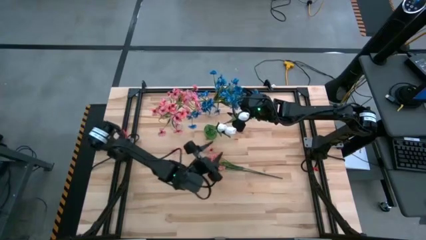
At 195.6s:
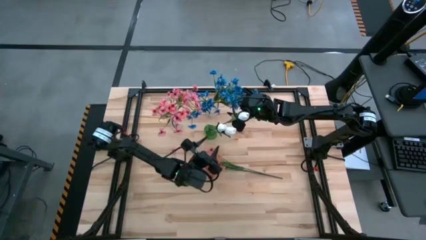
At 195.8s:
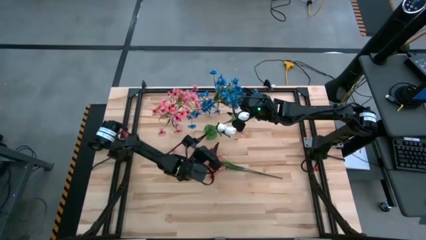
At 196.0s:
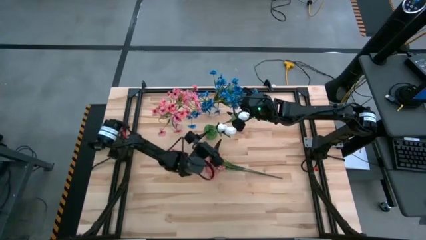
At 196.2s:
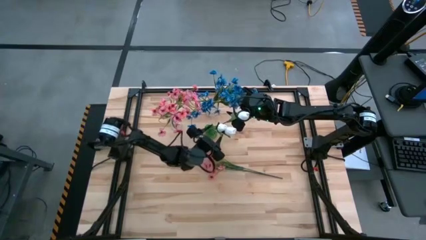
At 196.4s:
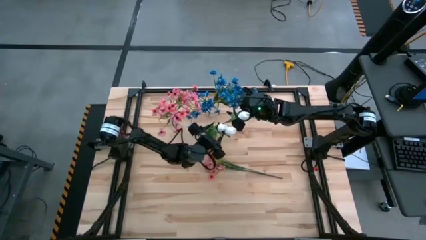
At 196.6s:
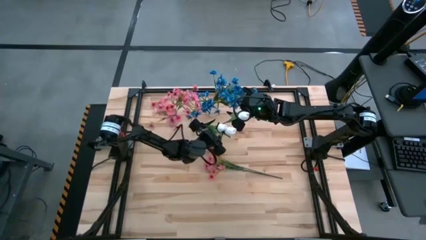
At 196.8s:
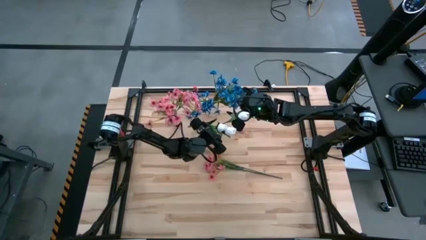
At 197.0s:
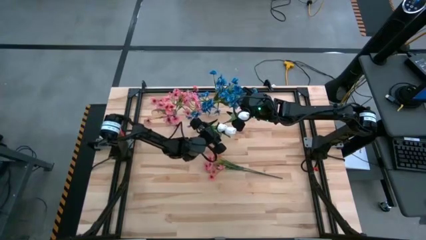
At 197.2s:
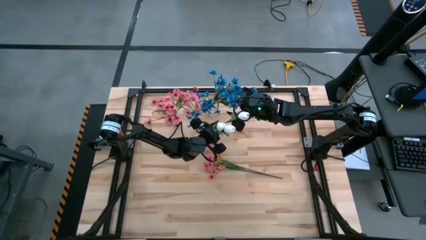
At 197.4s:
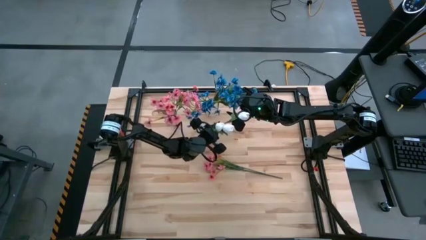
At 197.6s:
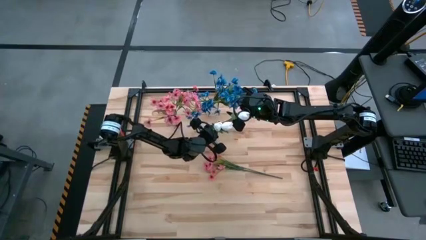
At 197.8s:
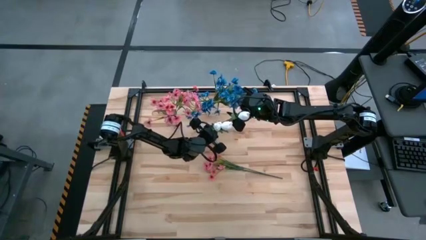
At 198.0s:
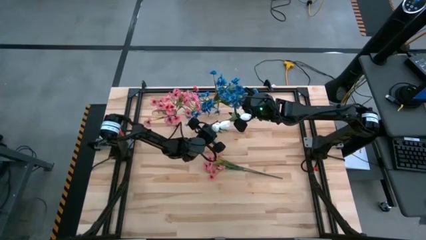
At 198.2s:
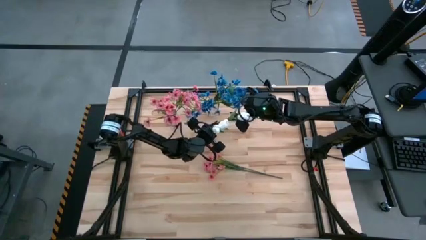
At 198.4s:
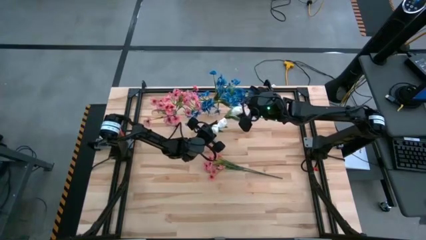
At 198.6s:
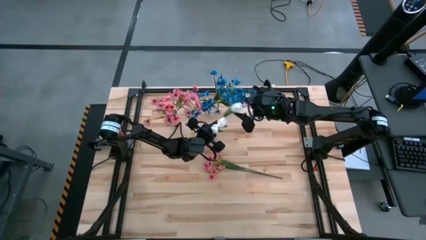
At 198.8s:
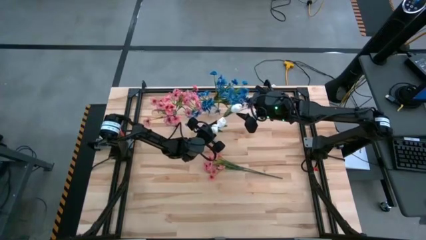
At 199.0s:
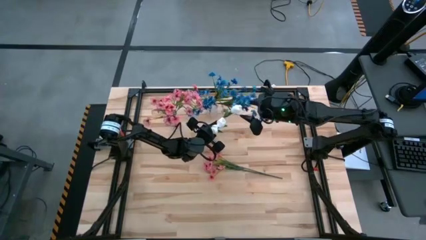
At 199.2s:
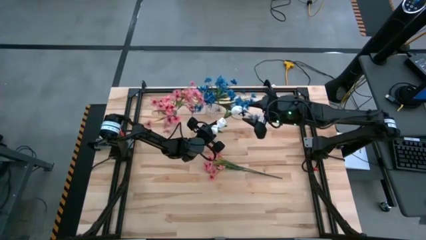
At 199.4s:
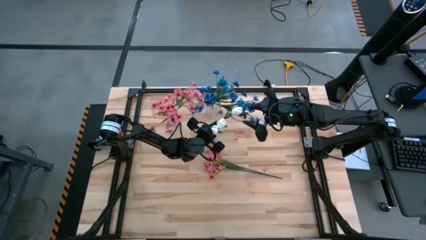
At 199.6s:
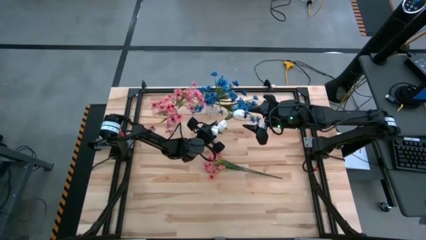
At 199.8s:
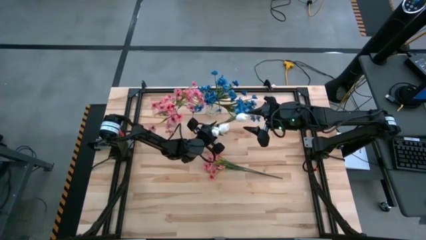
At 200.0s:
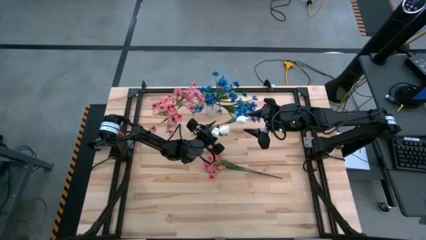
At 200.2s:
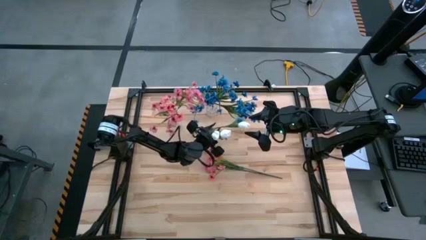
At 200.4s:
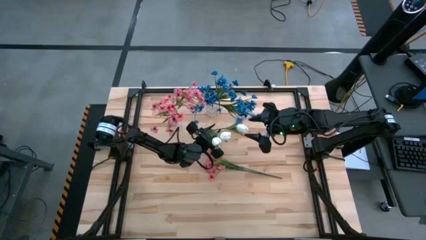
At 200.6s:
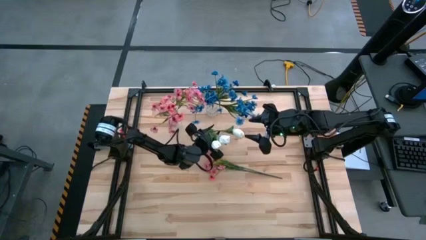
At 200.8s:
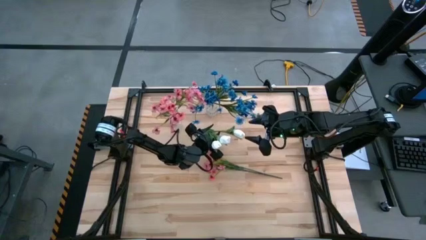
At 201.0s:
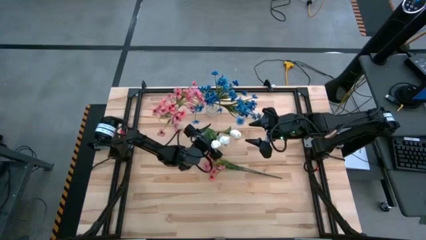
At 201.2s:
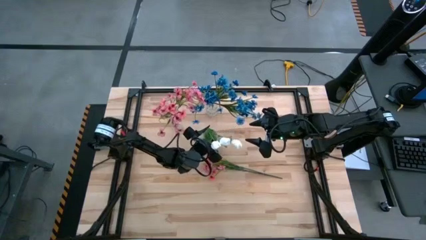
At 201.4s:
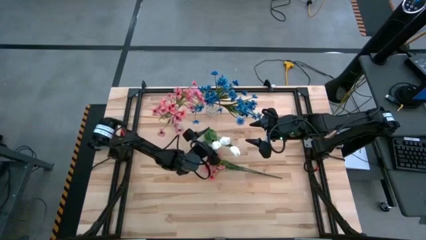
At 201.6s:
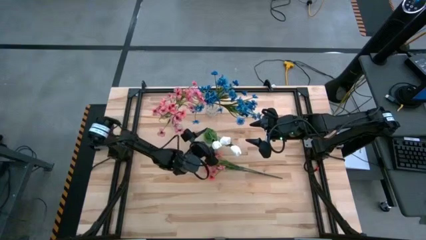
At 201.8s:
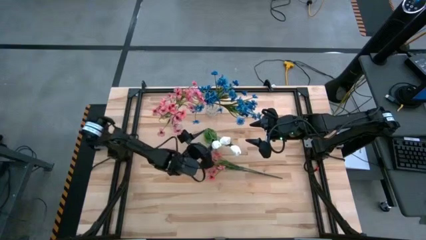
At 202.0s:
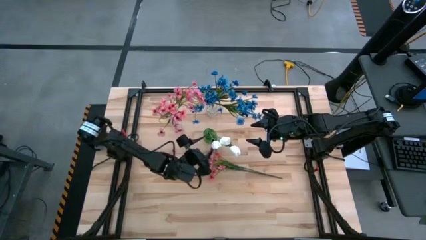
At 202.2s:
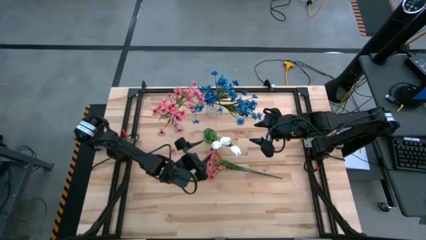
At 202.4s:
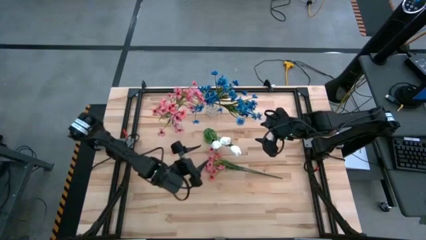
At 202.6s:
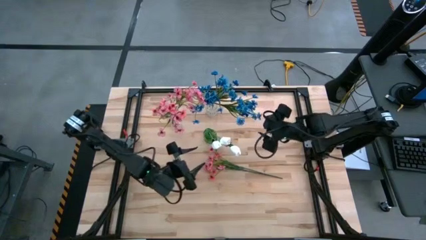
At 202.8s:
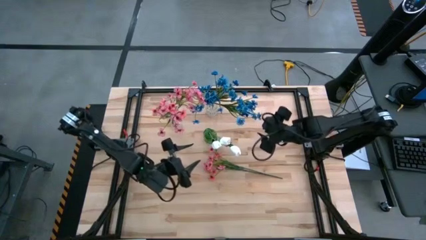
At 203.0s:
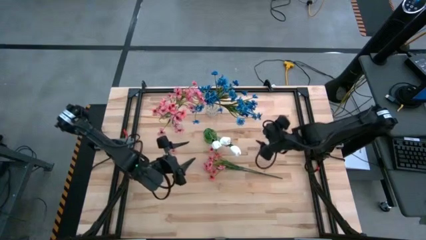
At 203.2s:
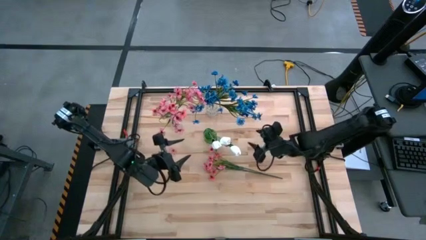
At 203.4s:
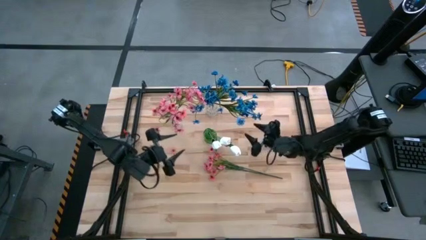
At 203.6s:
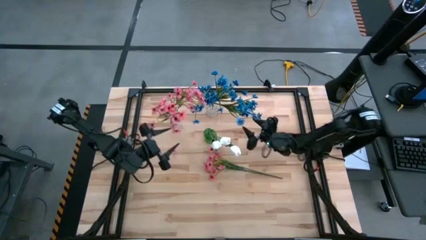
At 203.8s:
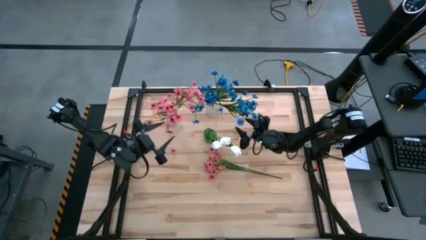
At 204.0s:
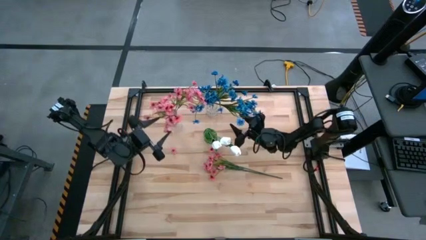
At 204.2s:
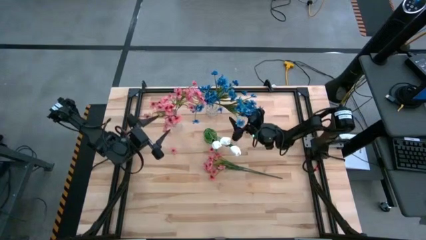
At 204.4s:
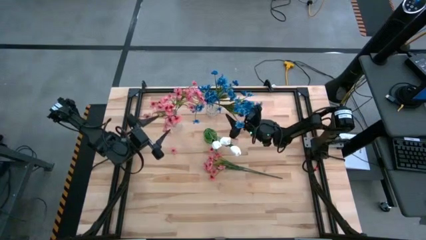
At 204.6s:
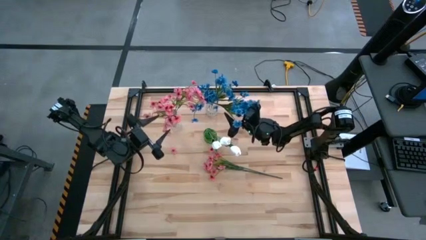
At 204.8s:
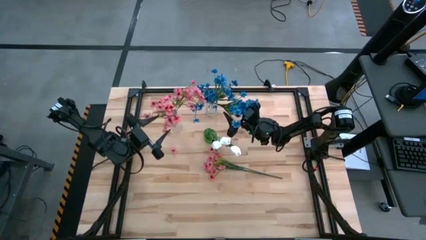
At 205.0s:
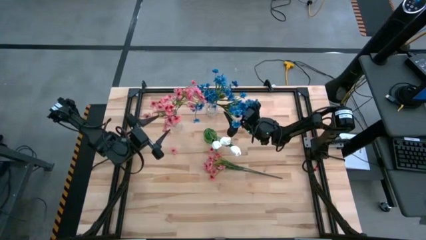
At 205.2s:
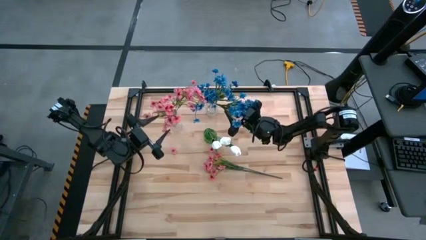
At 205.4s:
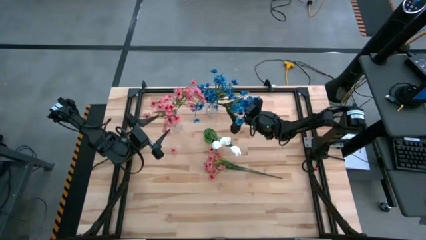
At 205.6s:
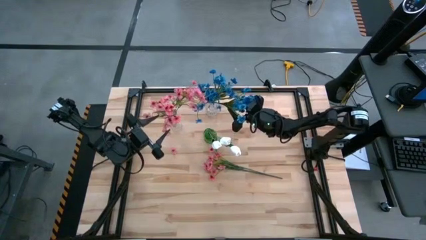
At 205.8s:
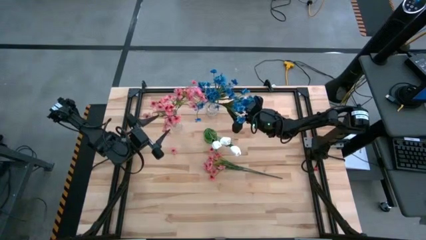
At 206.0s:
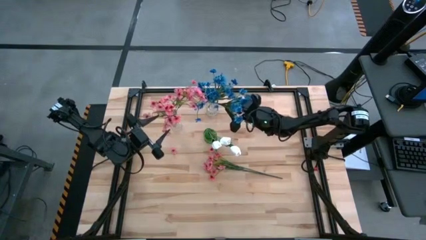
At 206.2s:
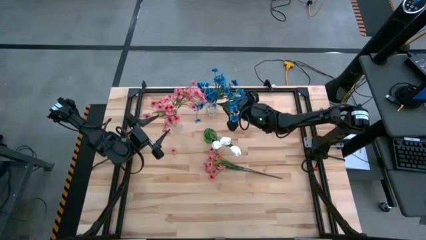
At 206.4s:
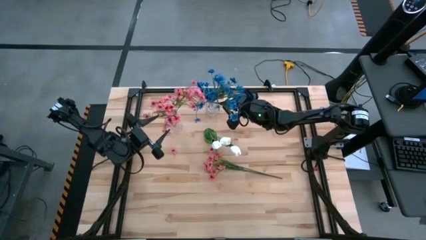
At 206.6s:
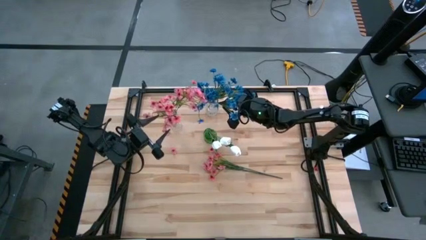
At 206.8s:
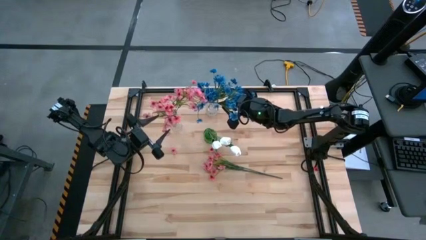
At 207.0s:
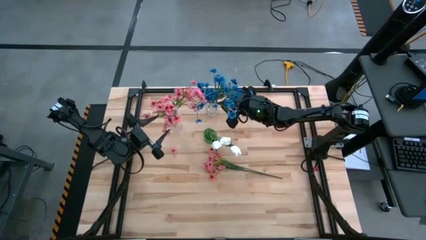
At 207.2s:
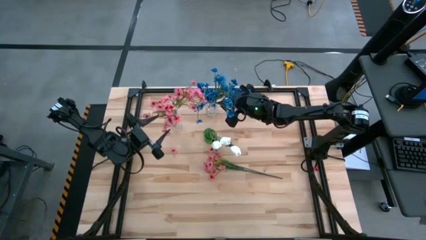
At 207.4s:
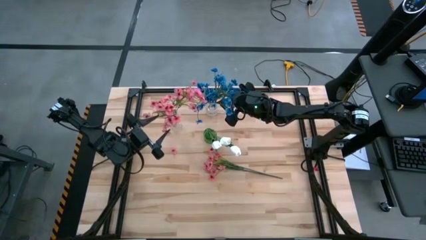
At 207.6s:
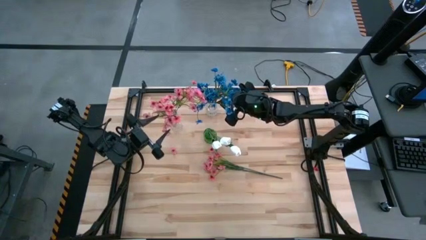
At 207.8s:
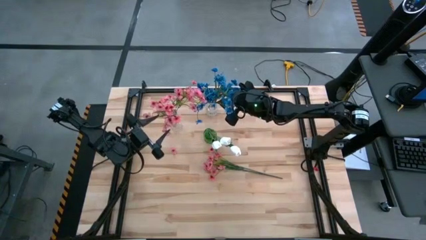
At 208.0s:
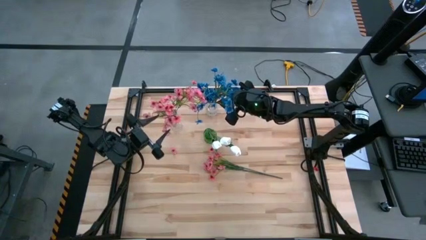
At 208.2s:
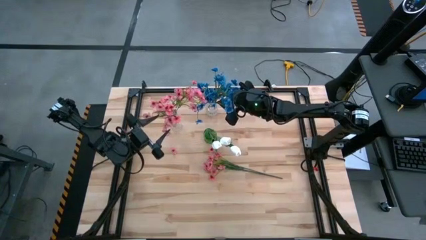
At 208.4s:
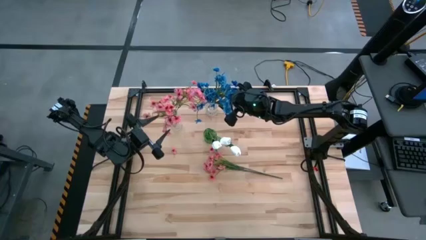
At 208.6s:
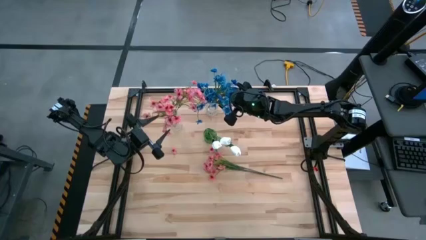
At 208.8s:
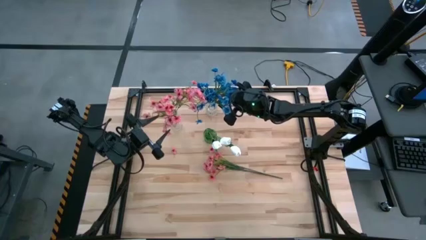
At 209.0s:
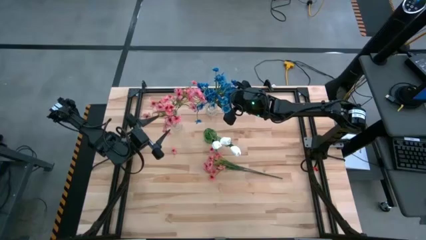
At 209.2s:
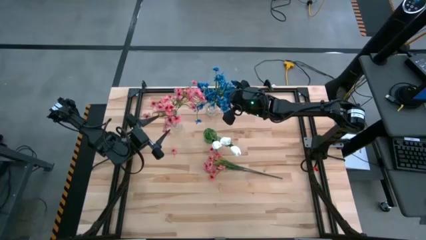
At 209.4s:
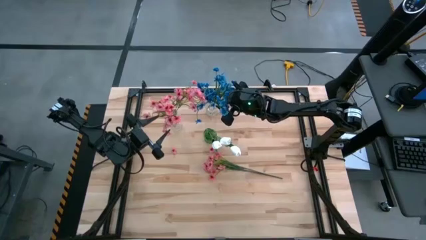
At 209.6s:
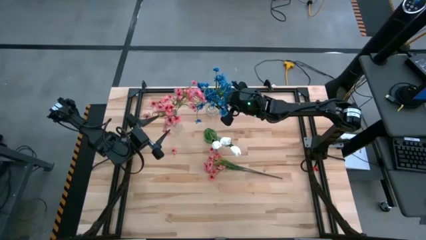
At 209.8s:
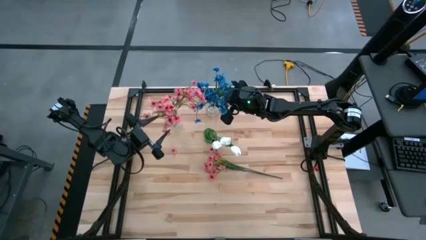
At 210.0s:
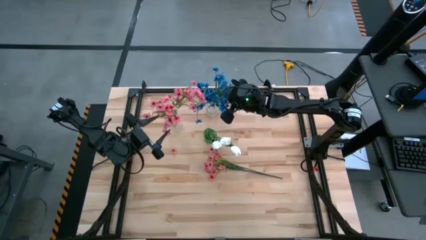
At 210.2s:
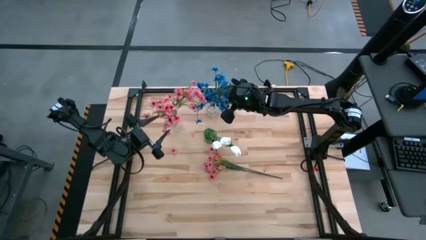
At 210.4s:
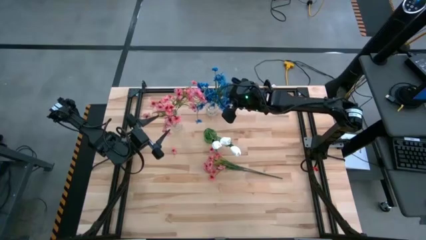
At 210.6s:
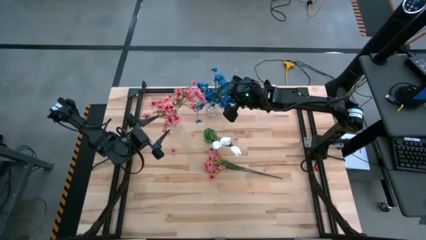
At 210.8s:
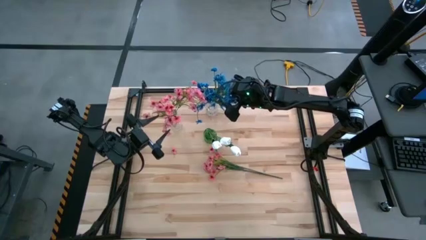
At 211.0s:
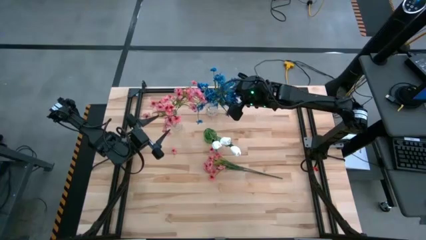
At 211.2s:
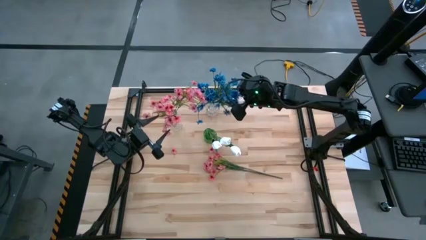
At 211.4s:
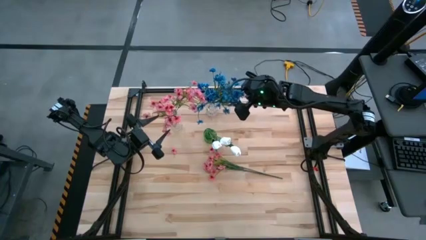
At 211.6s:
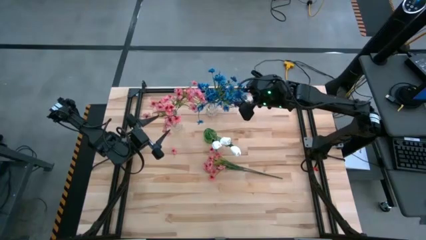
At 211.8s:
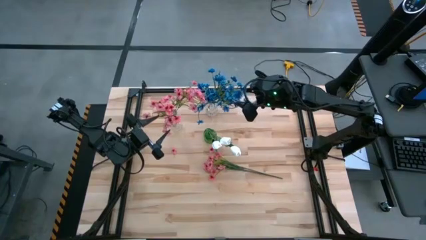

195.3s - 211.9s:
Task: Sort flowers into vase by color
Put the blue flowers into the right transparent vase
